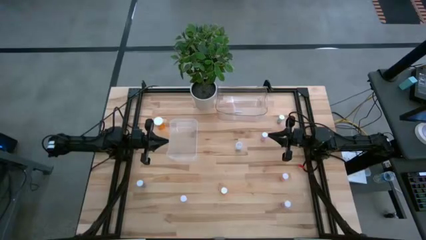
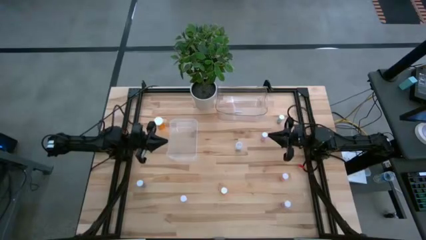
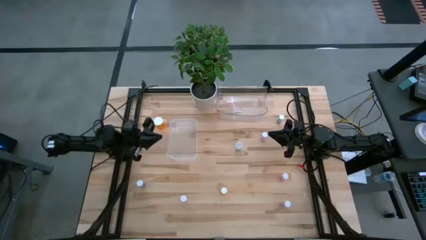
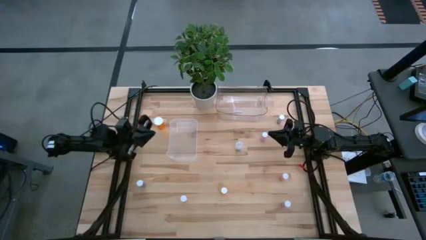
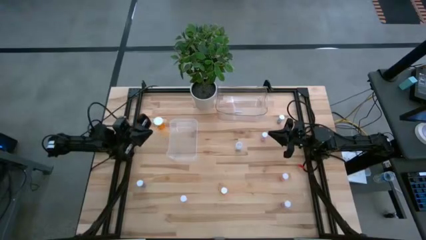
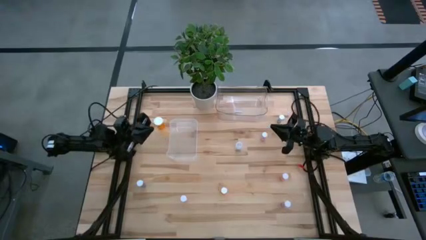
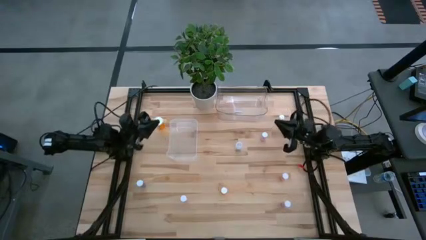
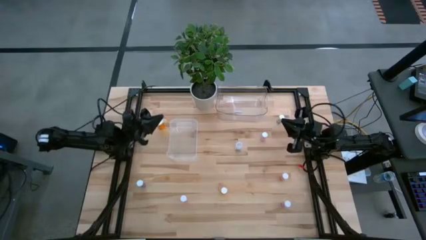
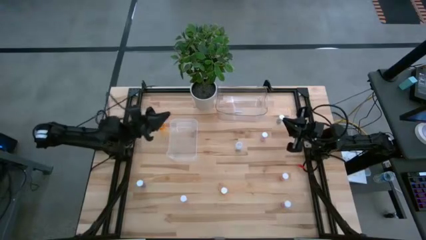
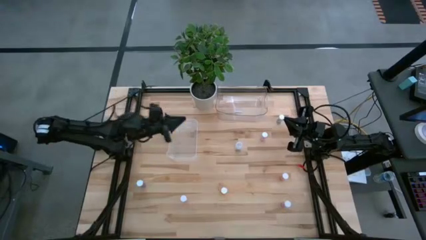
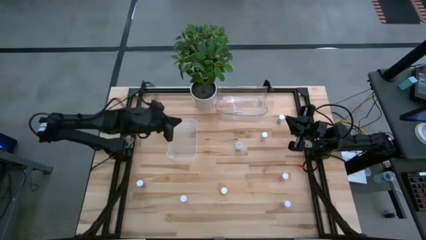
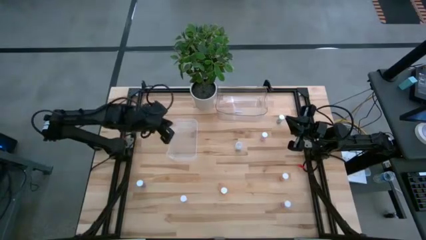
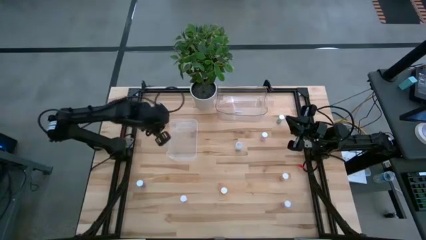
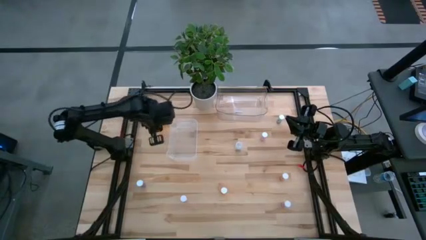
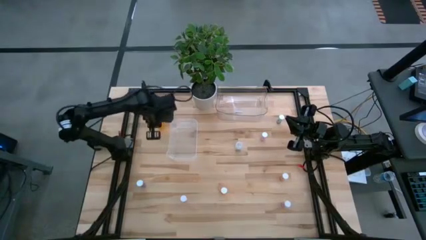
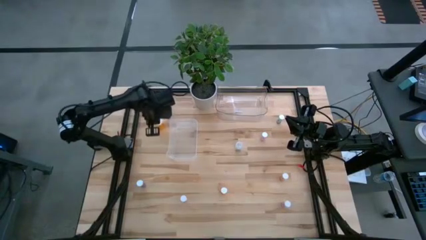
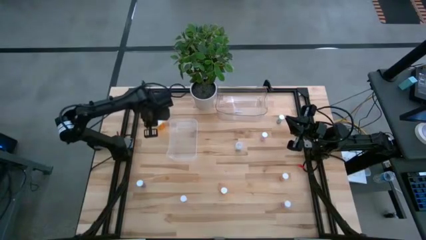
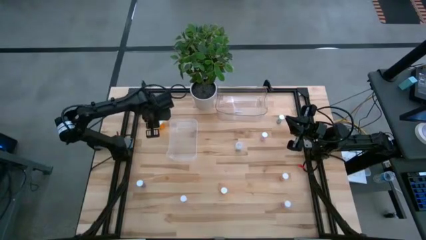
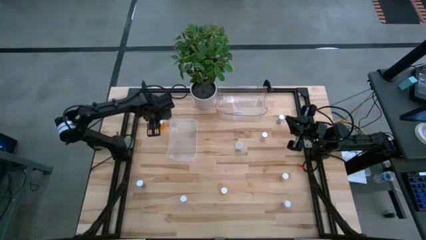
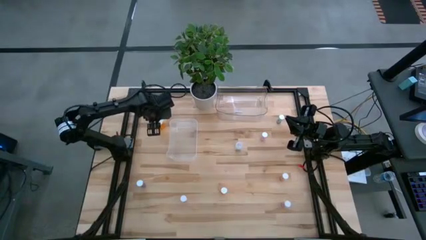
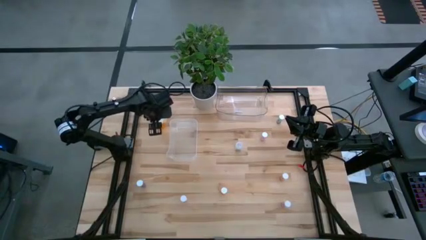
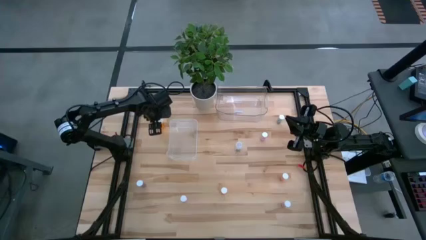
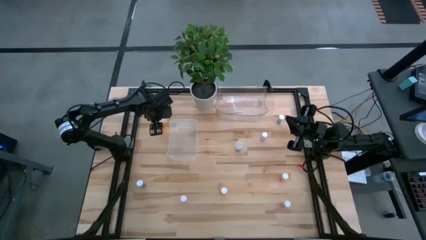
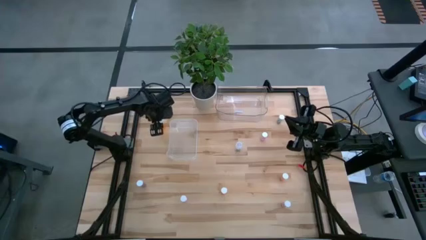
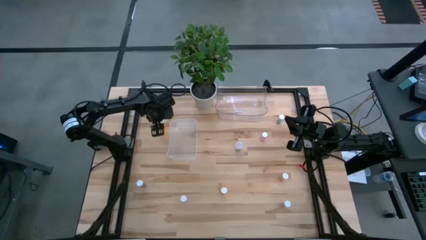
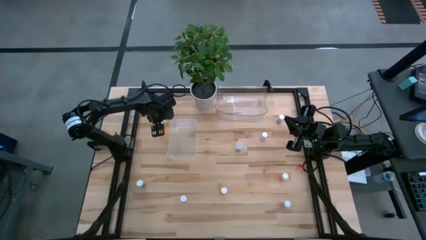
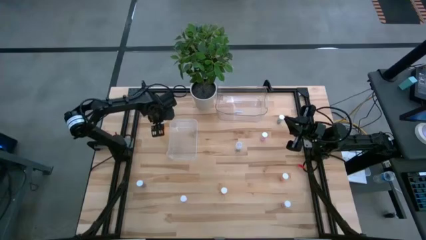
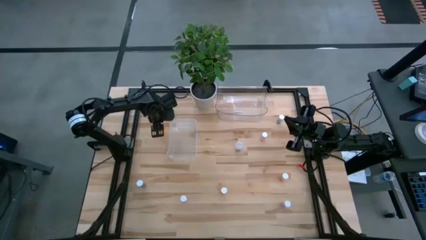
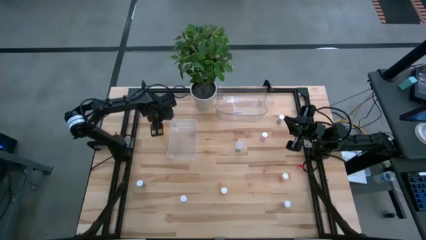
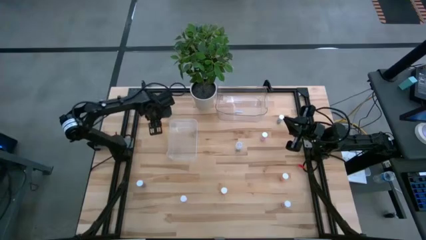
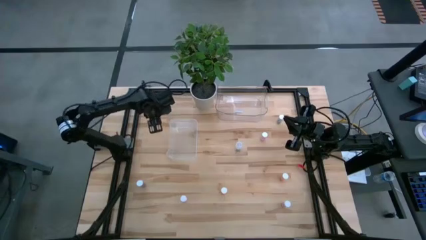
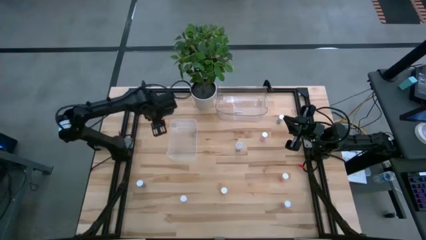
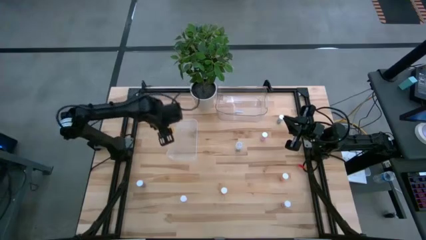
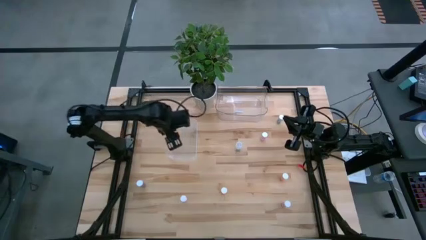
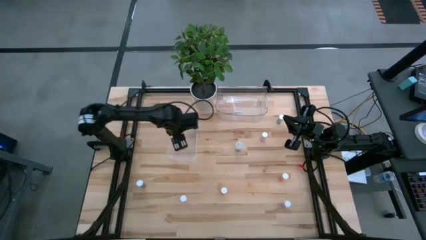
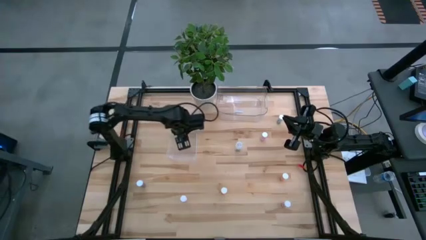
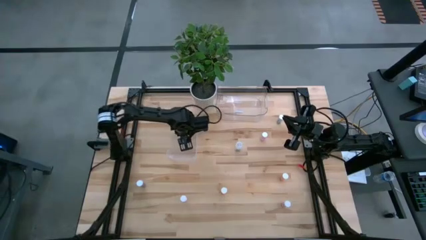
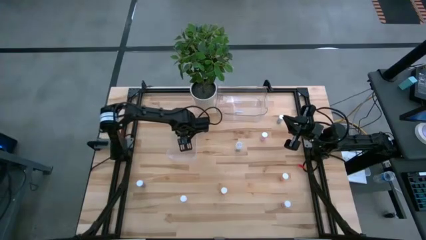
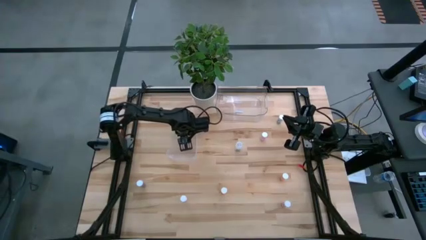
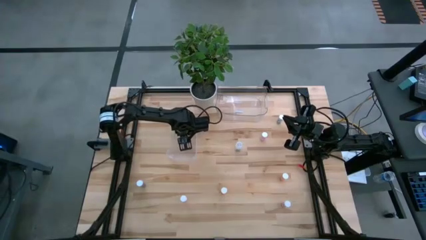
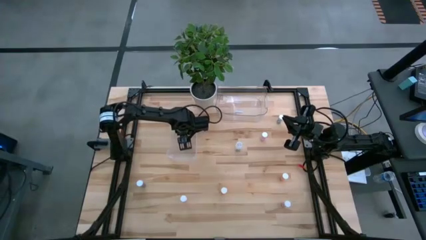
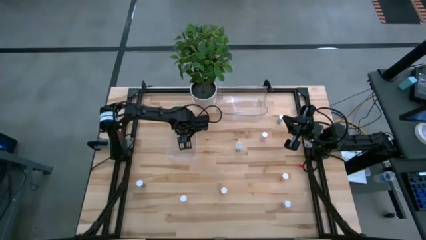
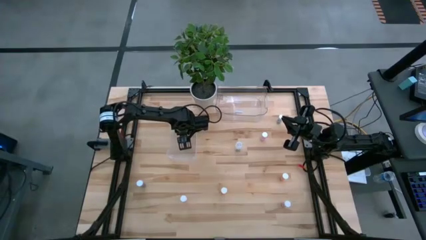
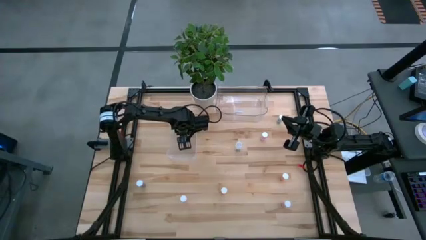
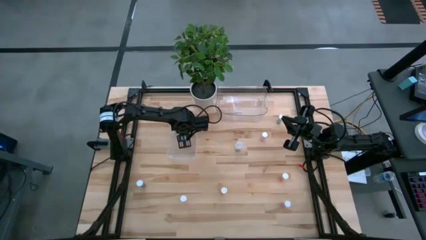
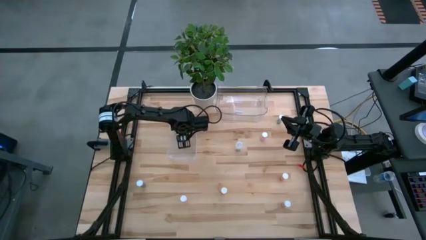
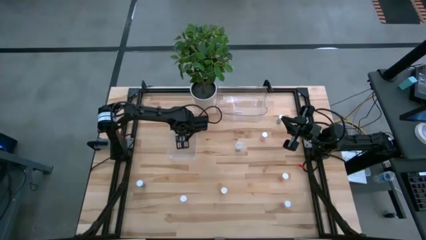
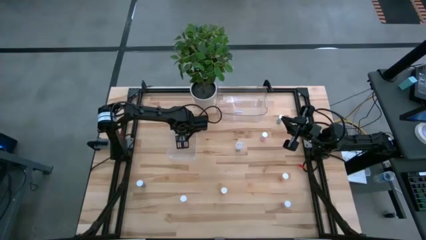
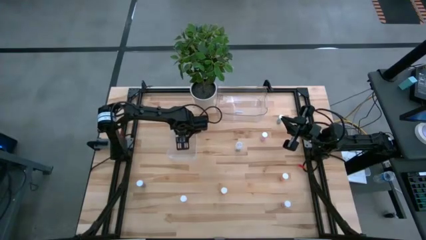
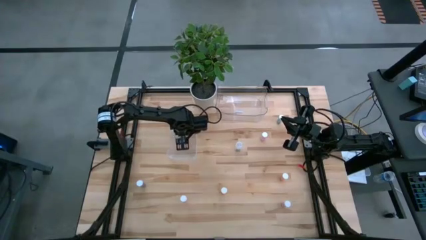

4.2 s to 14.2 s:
Task: Pick and place medicine bottles into bin by pill shape (circle, oval)
Put the big orange pill bottle into the bottom transparent bin

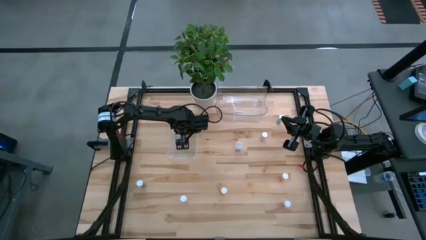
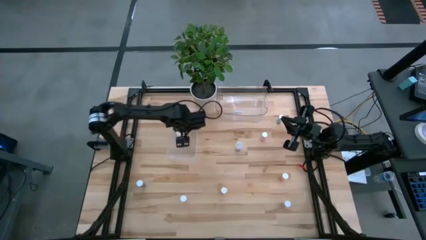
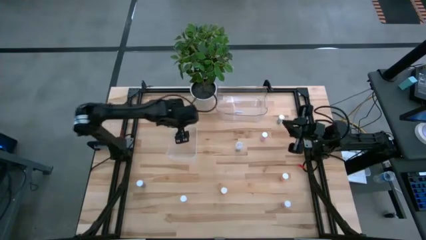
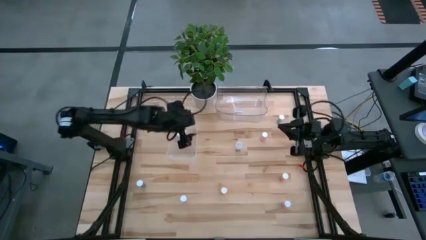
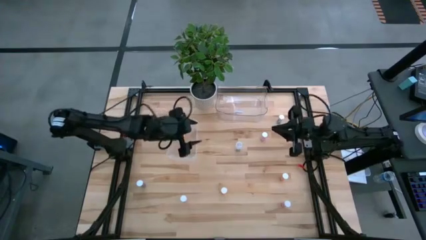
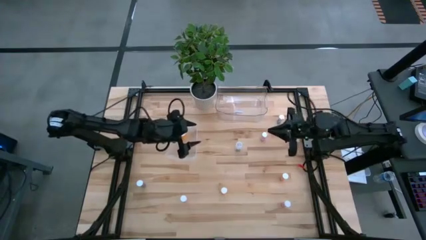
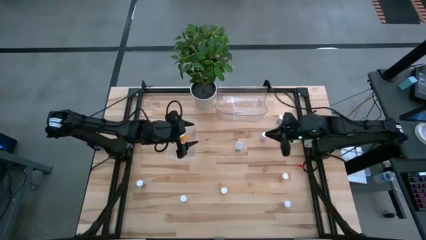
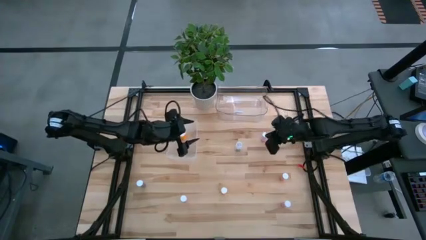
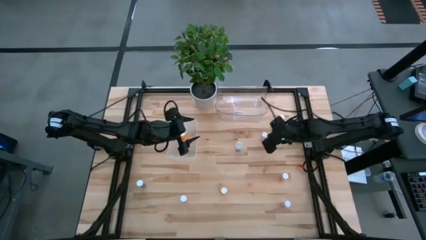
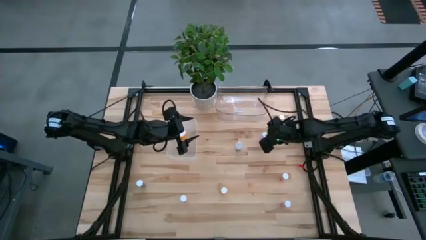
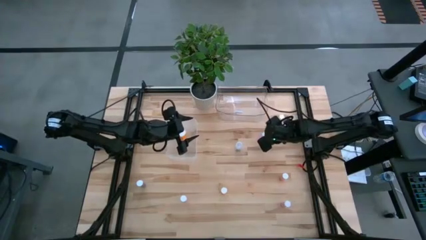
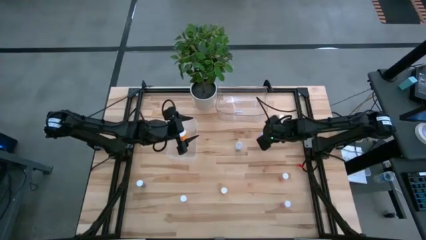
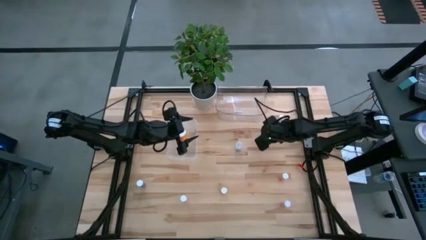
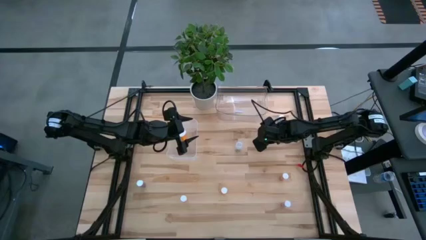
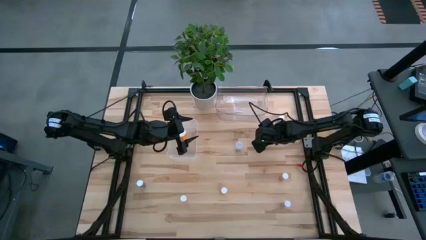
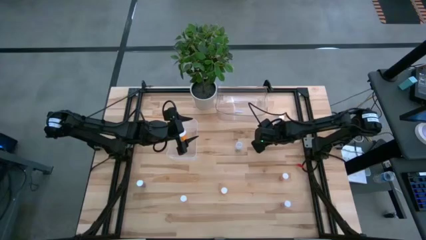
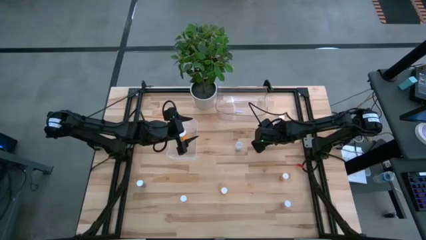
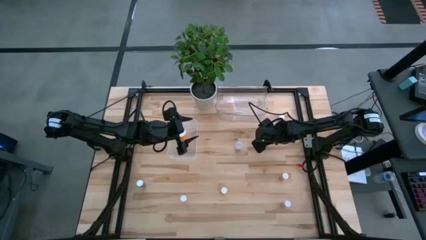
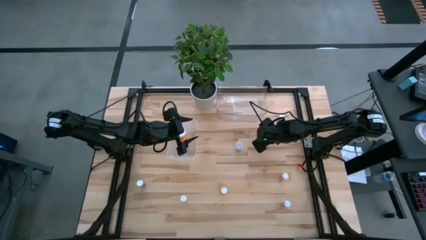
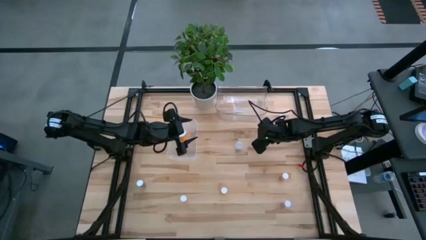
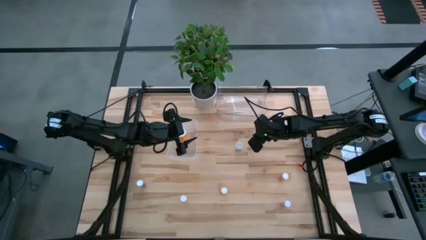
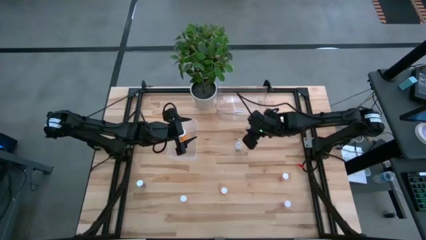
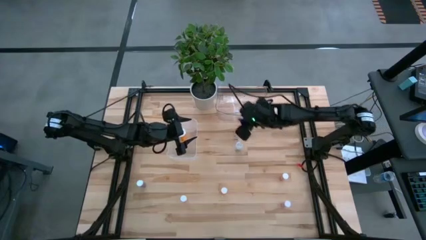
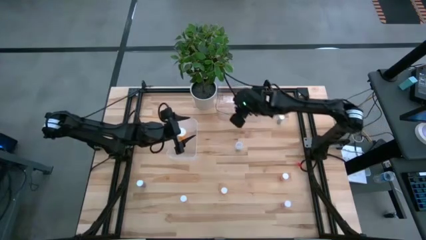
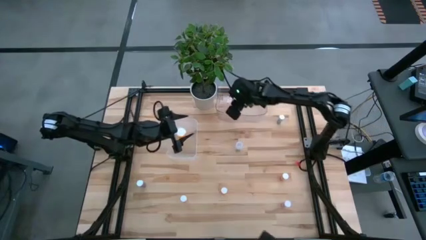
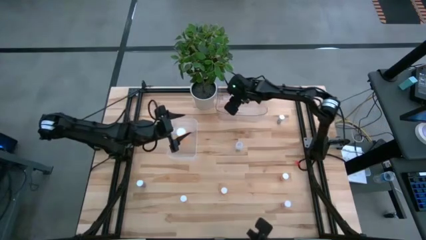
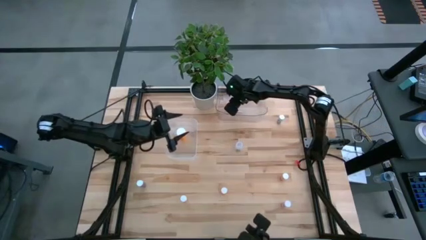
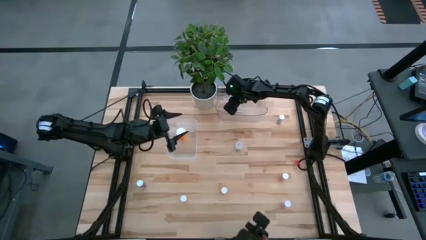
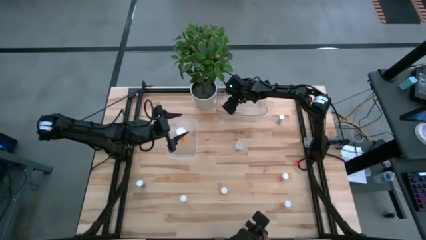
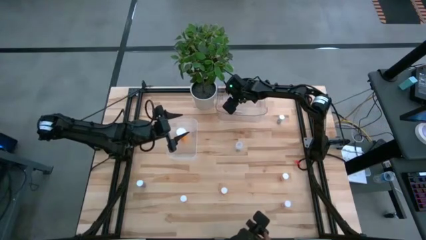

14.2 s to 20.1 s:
Put the top pink pill bottle into the top transparent bin
